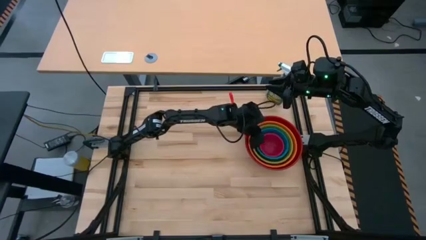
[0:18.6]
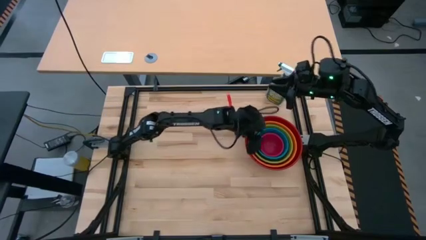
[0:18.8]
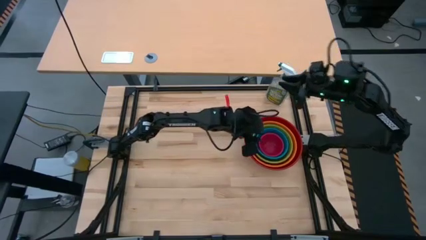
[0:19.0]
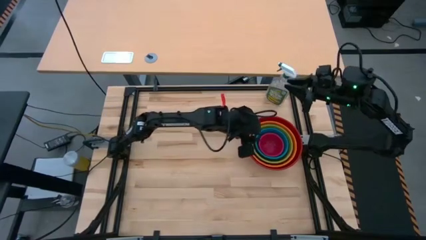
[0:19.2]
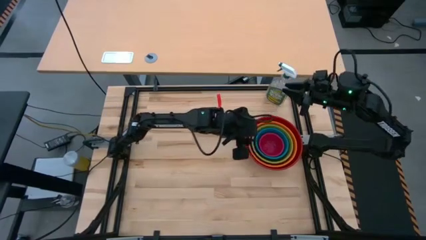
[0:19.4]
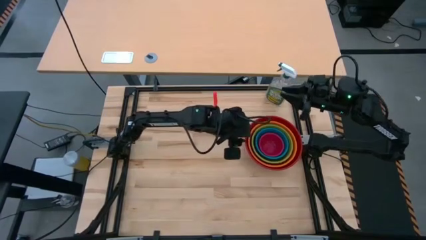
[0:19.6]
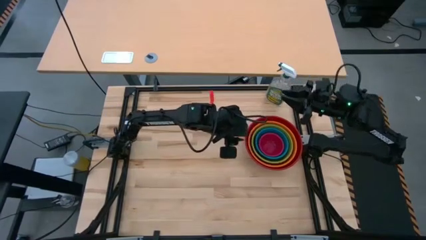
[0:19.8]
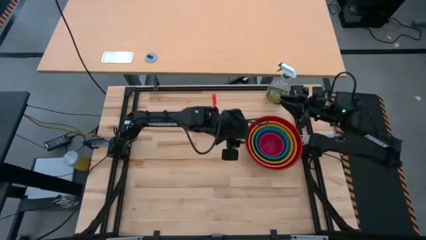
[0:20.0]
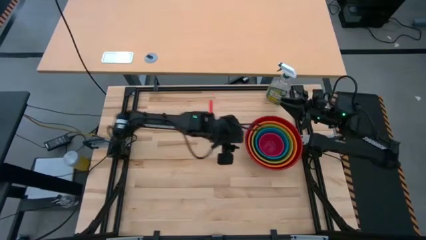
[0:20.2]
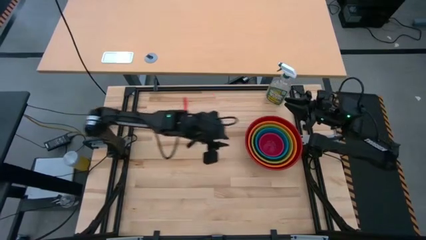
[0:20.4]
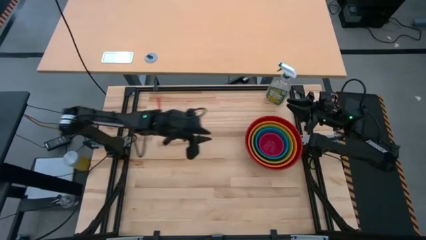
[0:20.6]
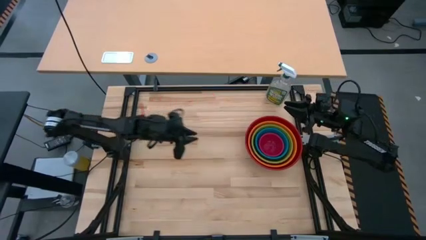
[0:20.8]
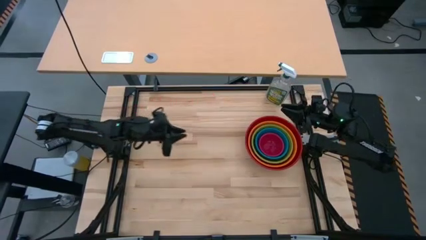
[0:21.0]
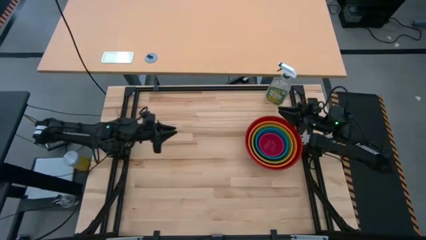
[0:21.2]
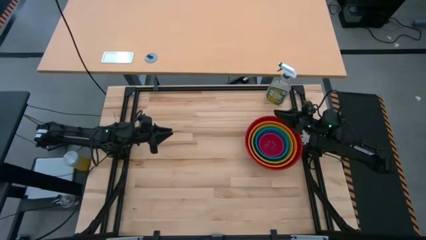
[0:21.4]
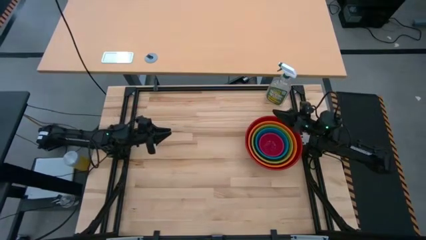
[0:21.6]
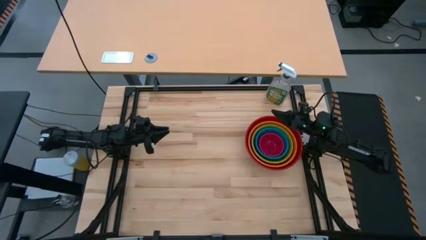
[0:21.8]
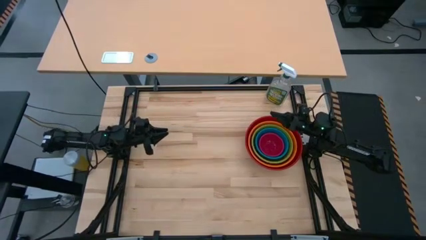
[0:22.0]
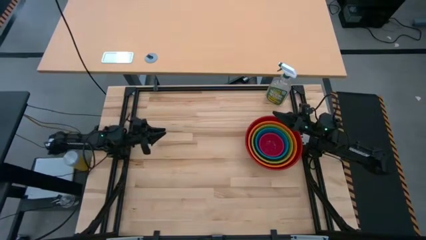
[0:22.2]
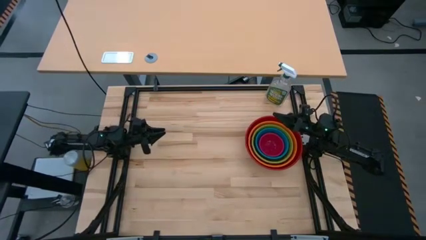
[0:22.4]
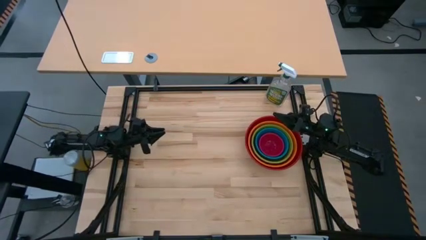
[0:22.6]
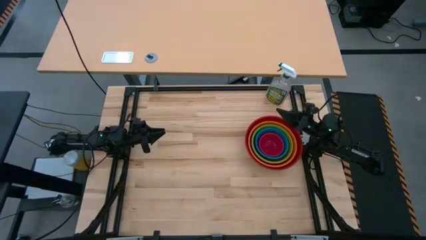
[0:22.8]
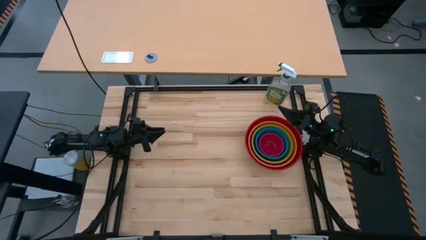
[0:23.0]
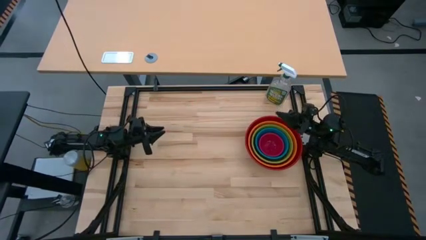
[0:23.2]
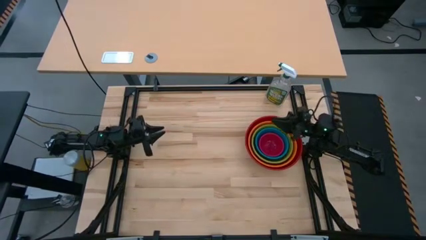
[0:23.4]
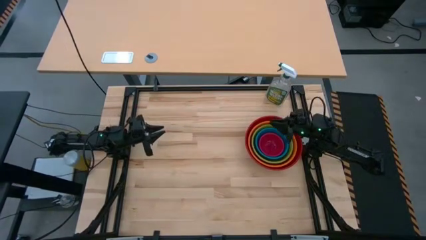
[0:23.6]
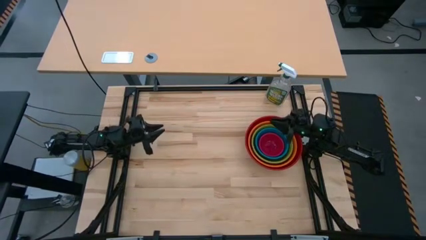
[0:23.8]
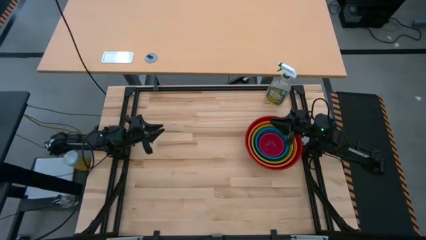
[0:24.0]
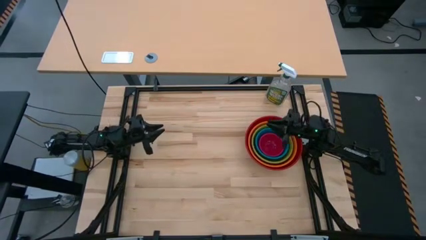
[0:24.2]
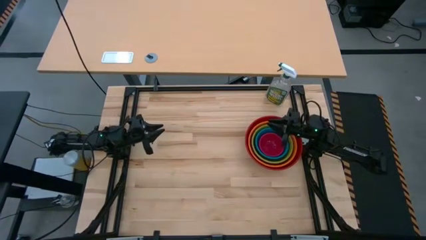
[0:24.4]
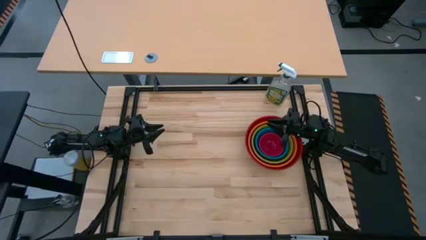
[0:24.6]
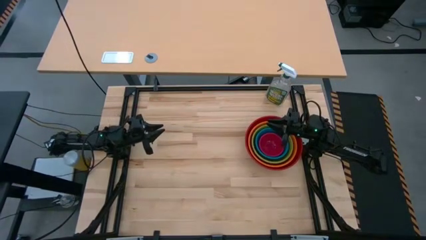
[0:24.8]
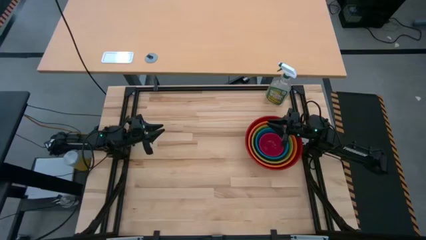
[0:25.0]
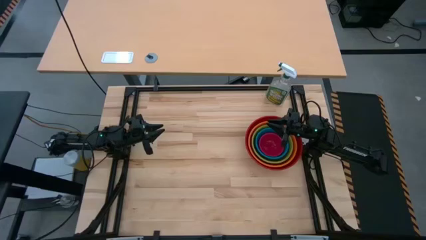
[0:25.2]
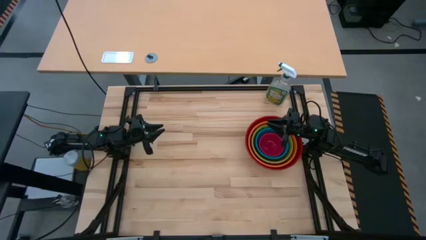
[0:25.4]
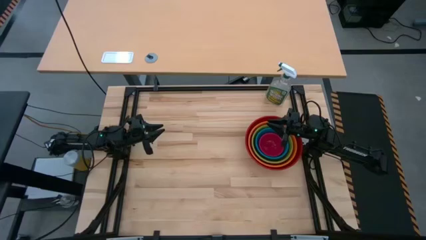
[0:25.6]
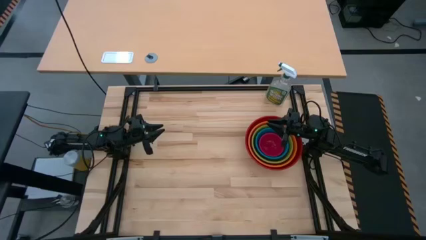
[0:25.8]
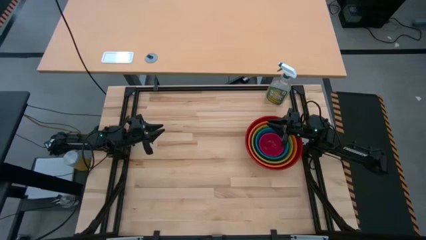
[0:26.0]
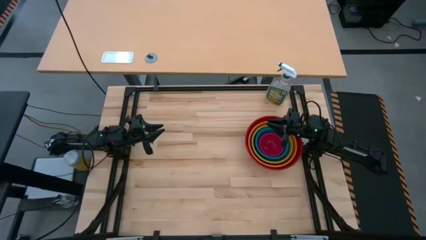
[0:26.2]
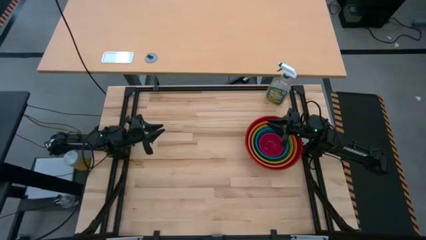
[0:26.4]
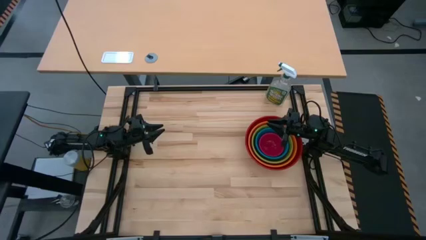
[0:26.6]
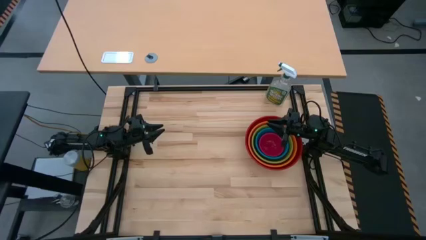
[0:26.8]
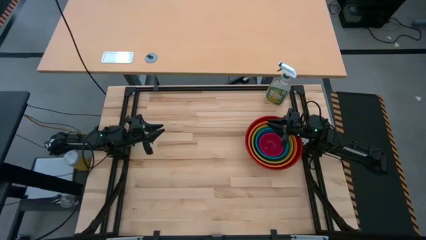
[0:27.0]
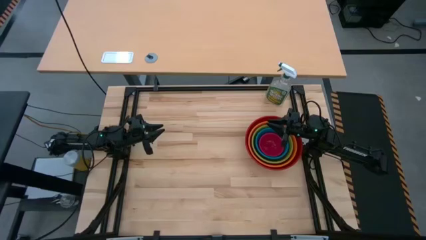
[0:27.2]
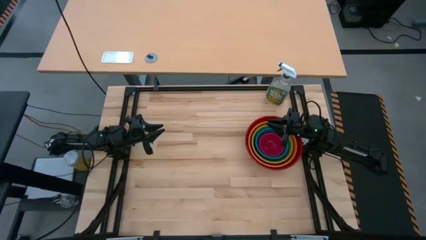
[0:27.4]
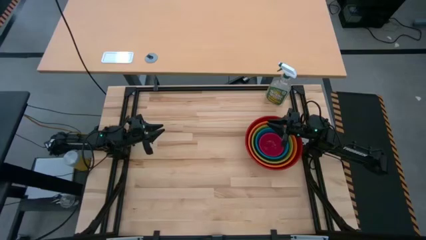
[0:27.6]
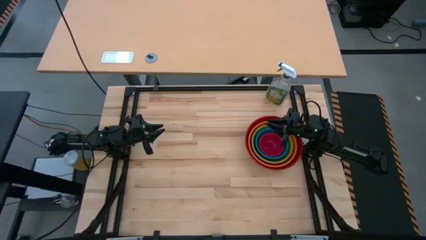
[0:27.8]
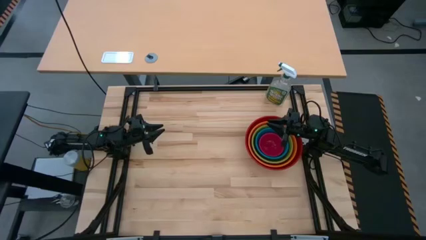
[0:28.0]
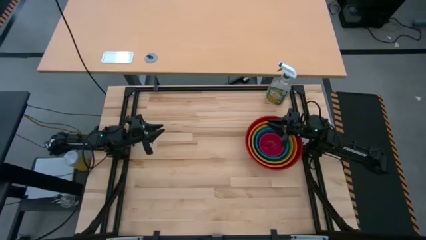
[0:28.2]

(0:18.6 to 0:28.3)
Return to home Position

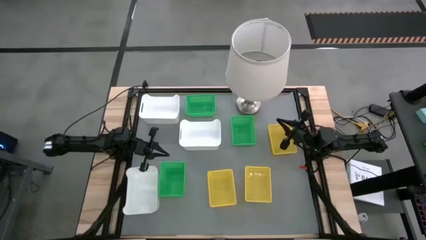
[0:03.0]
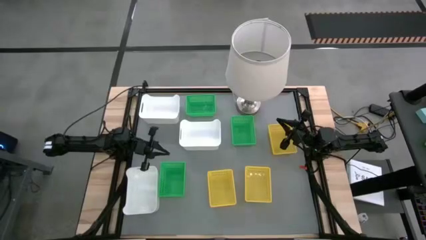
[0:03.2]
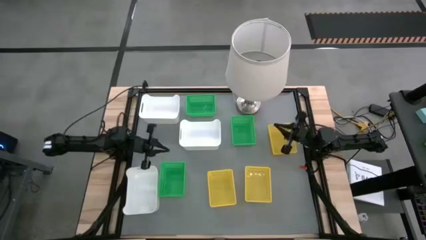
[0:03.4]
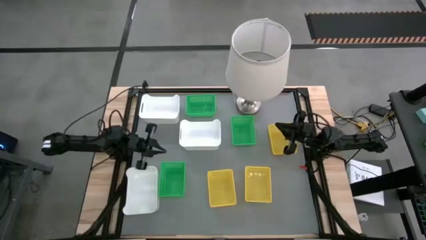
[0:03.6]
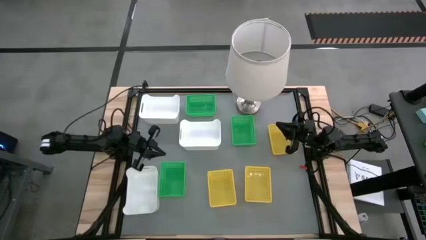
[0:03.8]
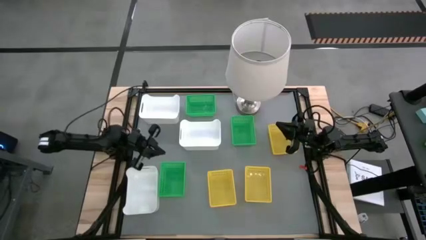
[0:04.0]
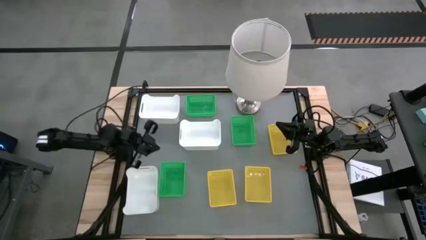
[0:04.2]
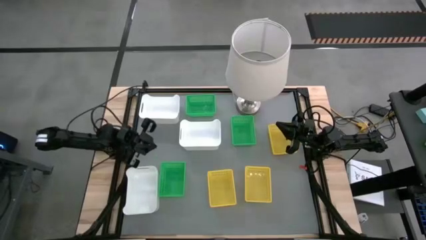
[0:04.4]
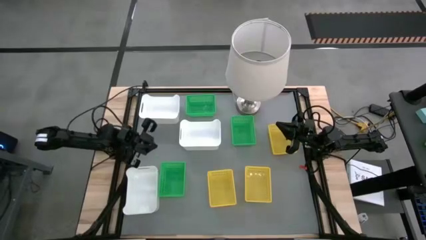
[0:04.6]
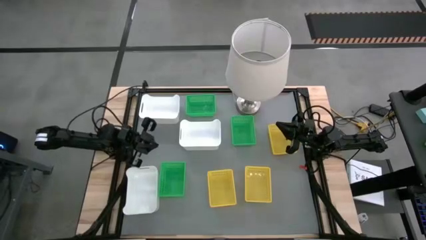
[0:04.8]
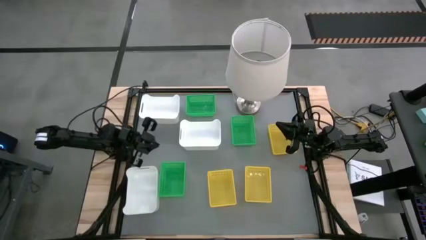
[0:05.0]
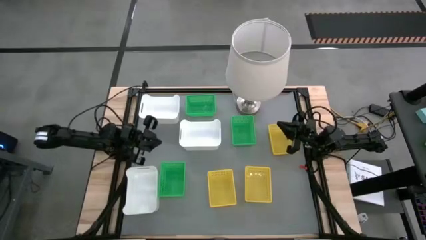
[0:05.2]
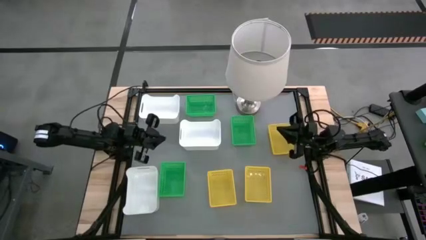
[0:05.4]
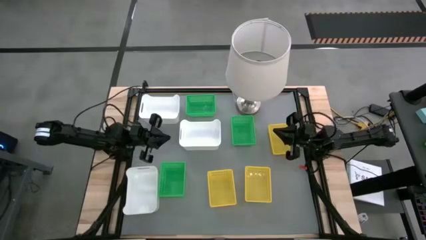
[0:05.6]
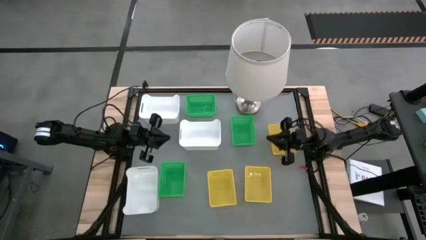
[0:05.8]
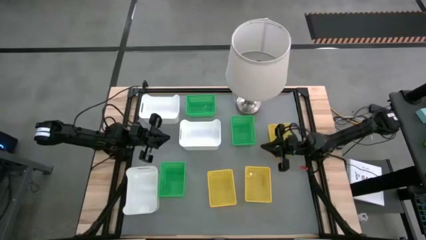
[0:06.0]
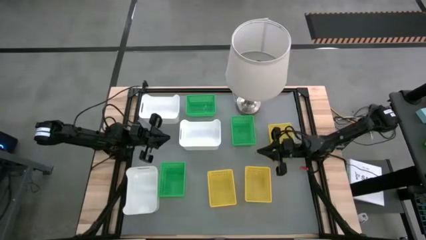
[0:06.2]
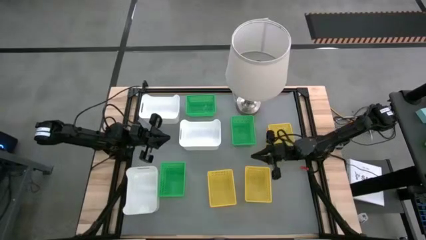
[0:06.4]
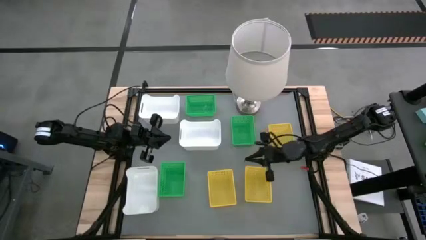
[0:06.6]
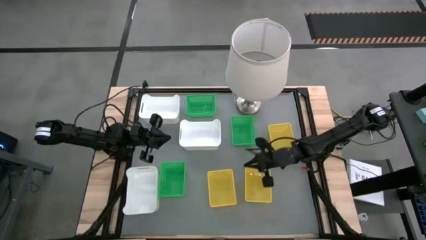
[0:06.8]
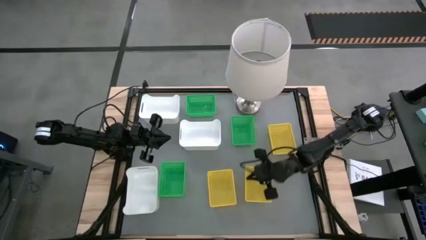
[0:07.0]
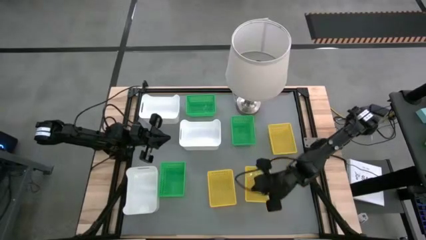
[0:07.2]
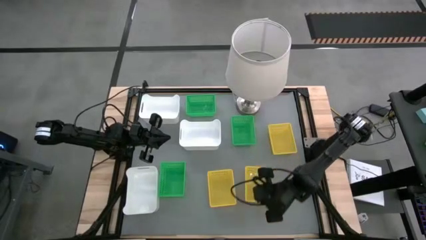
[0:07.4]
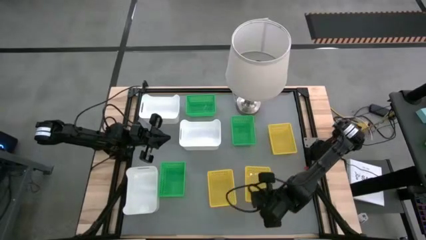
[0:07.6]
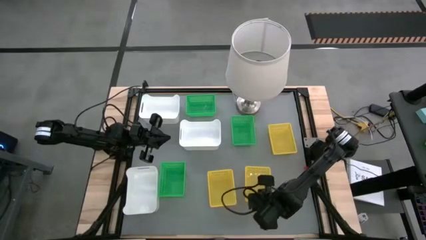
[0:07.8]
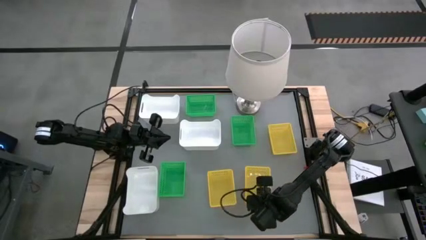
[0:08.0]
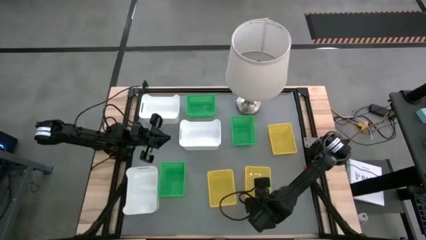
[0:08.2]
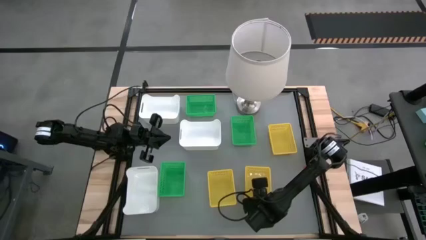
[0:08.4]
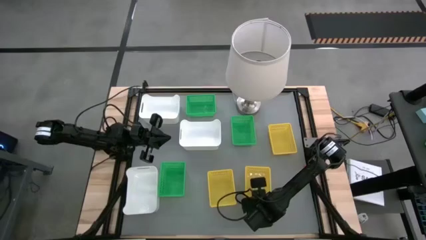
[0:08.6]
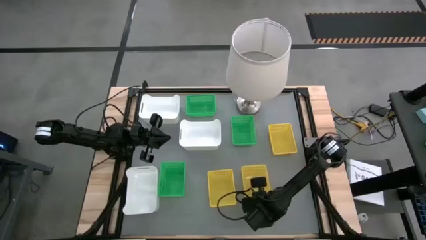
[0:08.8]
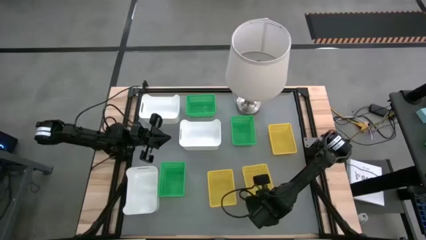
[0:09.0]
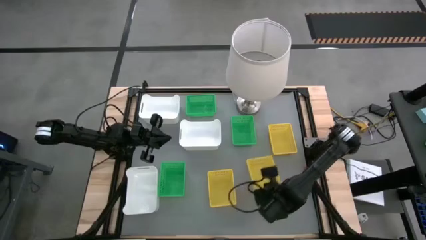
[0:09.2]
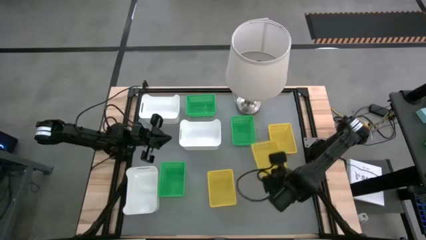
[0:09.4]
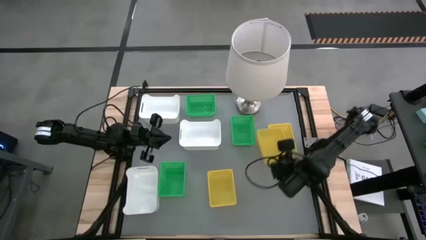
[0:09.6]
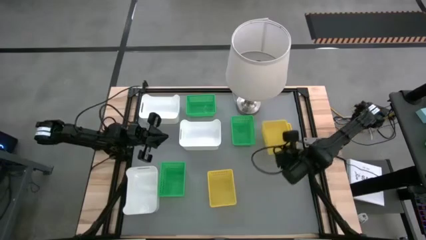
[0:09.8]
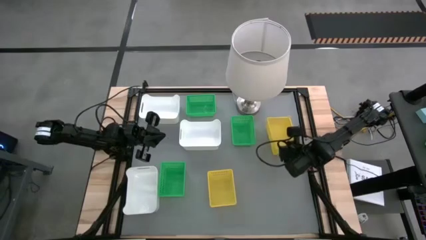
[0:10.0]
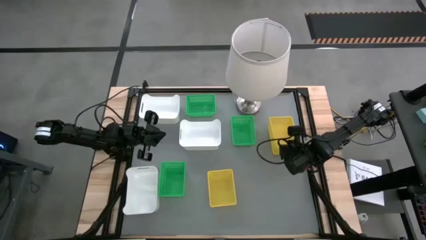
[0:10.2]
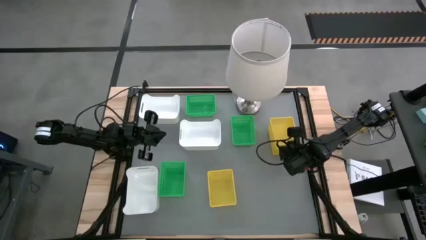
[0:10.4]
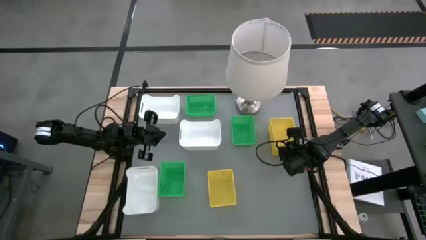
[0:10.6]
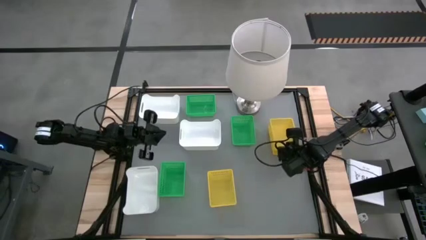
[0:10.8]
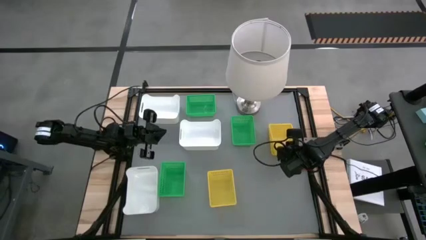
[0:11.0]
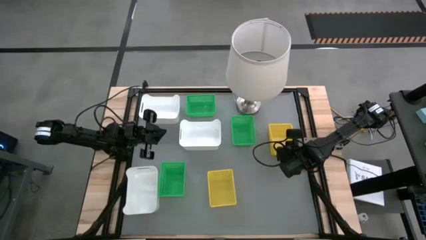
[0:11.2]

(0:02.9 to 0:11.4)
Stack the bottom right yellow bin on the top yellow bin
